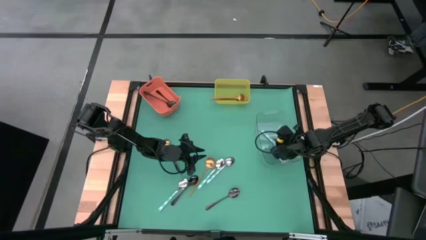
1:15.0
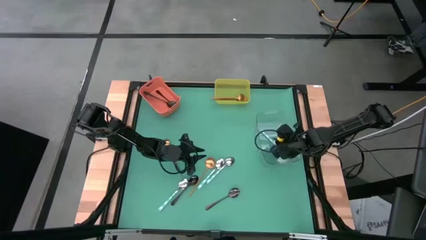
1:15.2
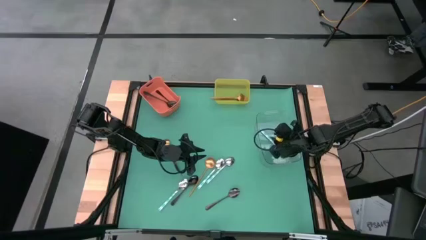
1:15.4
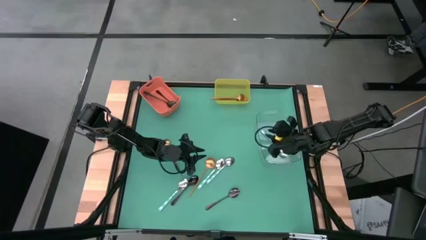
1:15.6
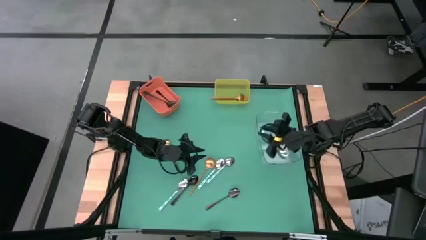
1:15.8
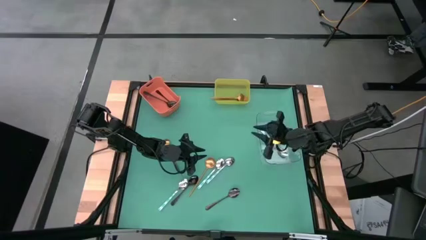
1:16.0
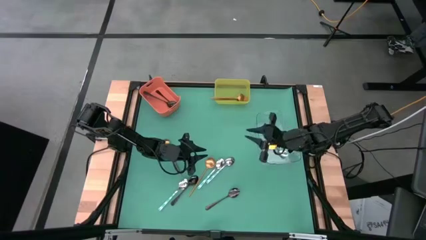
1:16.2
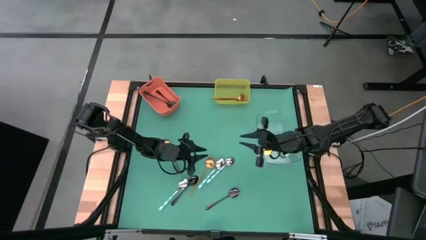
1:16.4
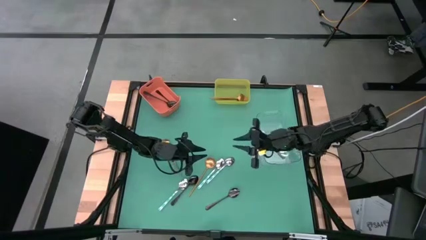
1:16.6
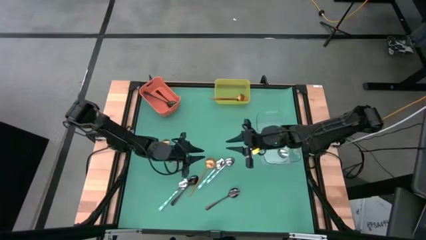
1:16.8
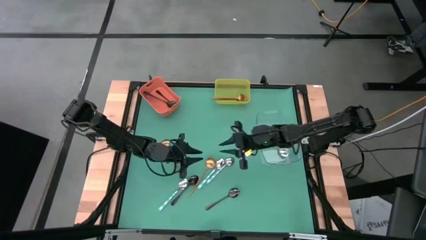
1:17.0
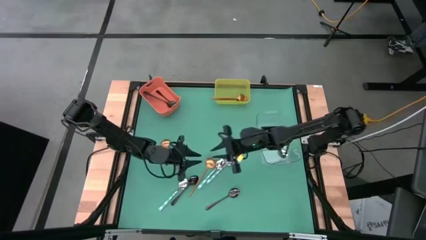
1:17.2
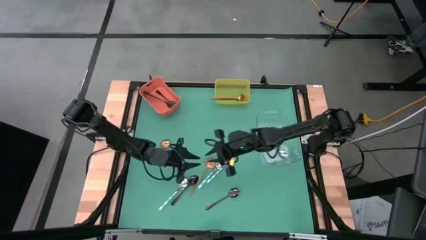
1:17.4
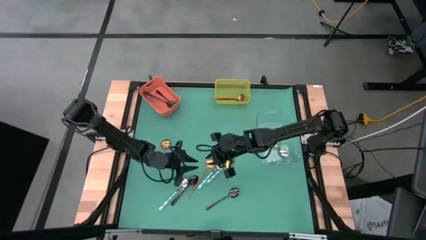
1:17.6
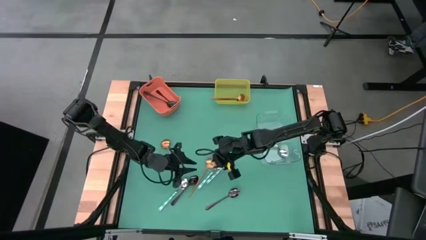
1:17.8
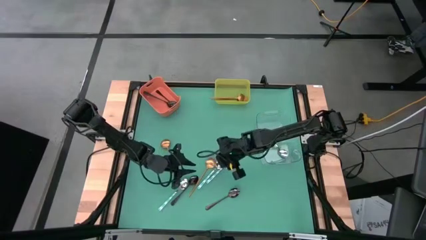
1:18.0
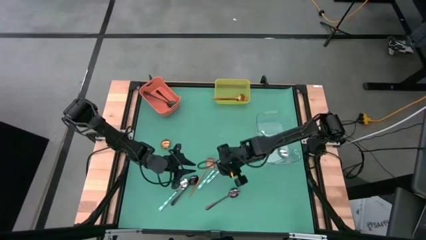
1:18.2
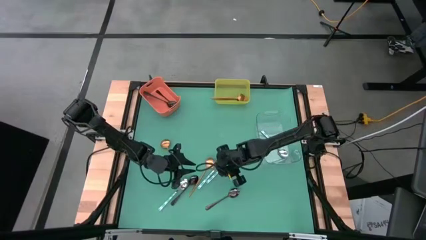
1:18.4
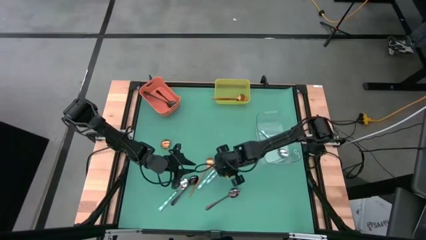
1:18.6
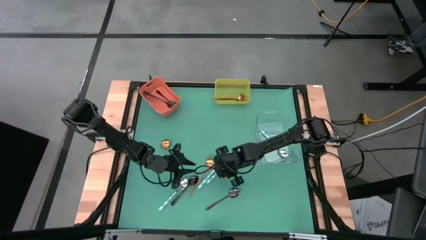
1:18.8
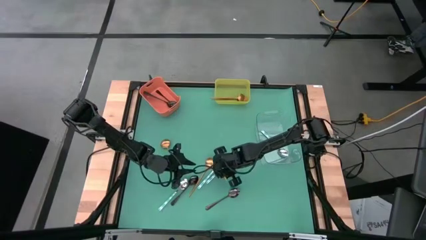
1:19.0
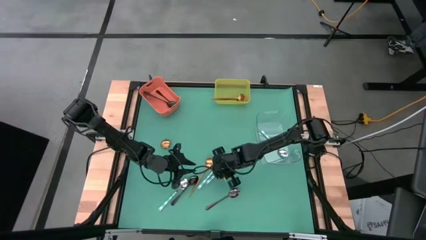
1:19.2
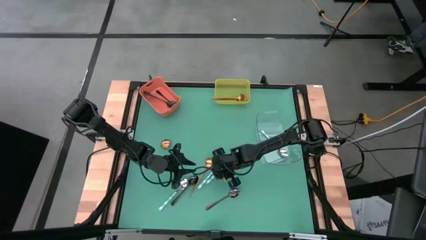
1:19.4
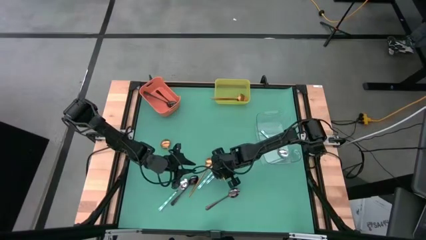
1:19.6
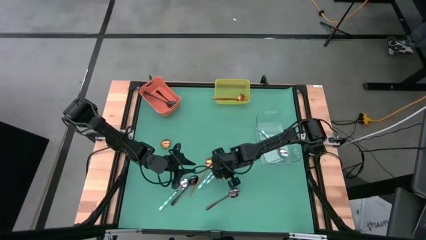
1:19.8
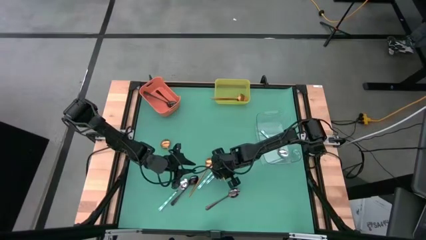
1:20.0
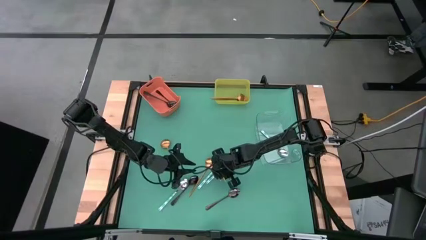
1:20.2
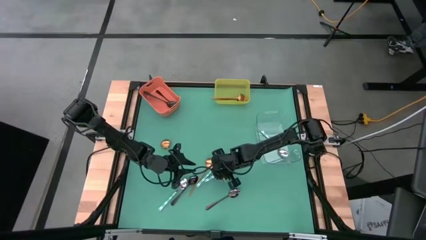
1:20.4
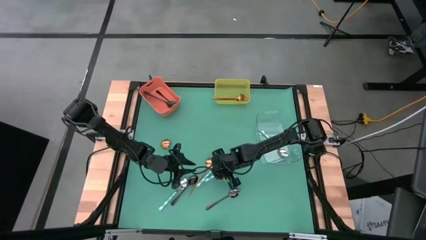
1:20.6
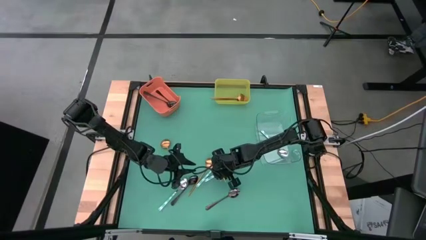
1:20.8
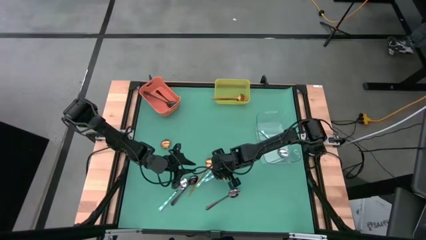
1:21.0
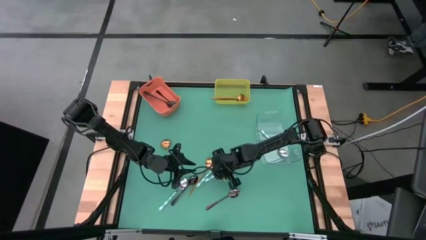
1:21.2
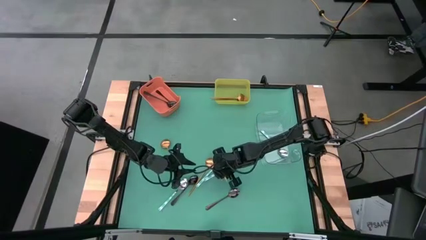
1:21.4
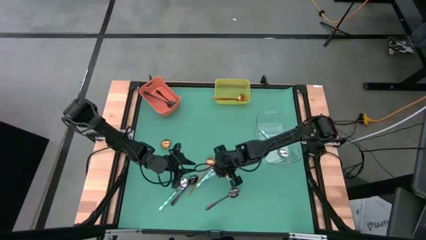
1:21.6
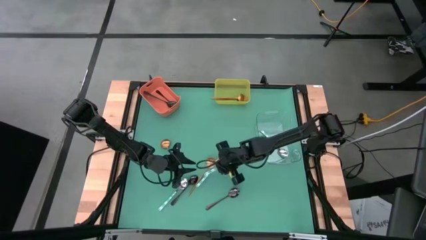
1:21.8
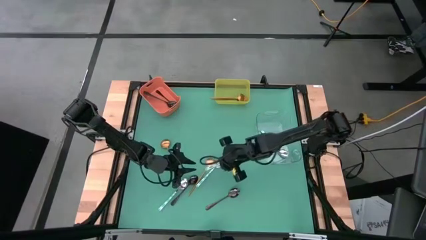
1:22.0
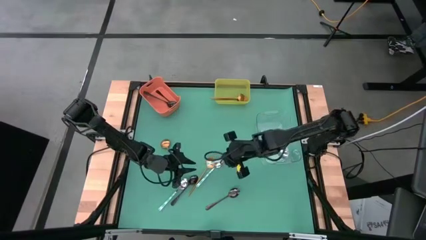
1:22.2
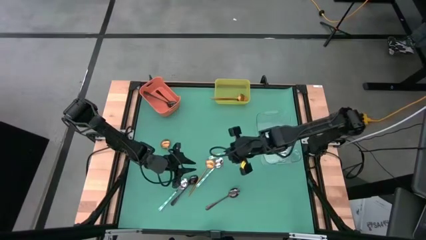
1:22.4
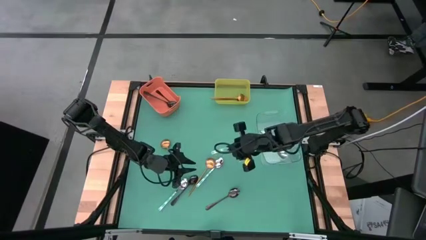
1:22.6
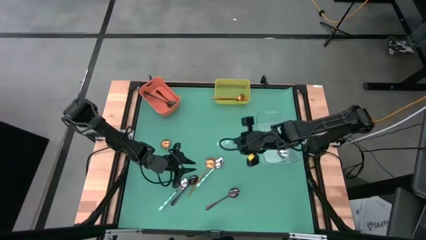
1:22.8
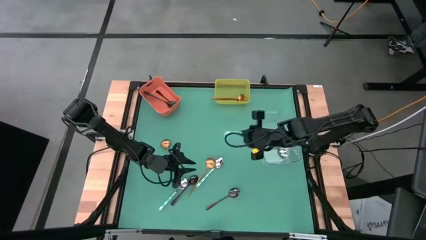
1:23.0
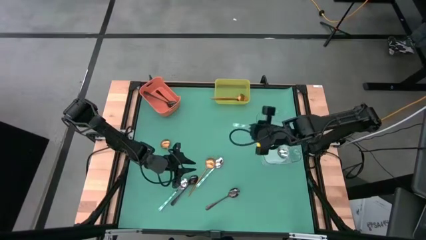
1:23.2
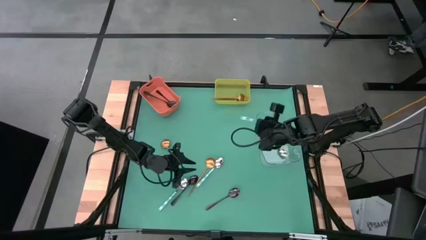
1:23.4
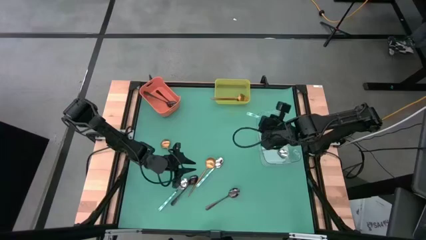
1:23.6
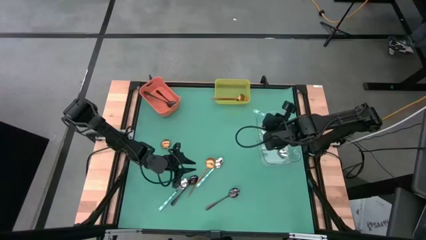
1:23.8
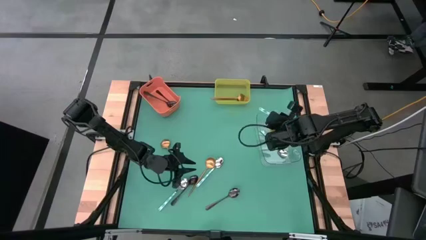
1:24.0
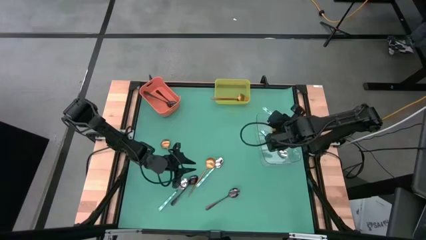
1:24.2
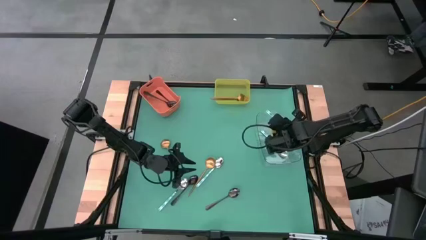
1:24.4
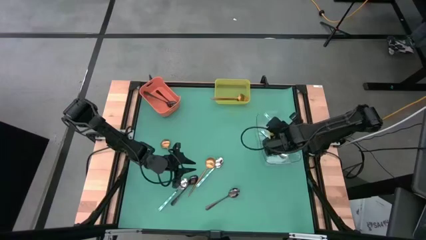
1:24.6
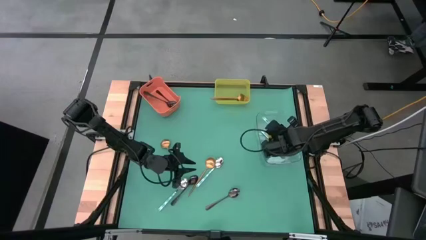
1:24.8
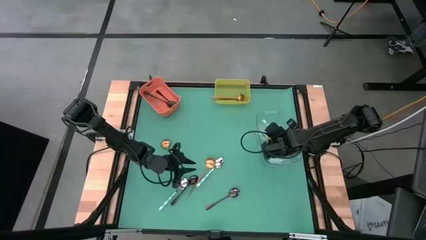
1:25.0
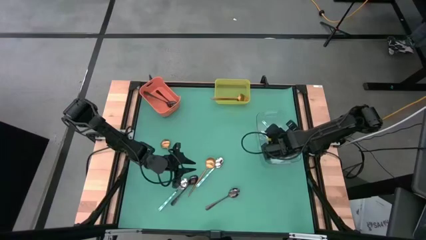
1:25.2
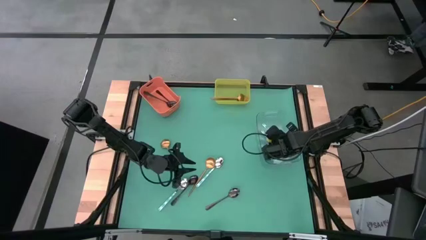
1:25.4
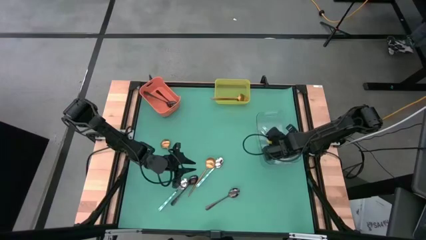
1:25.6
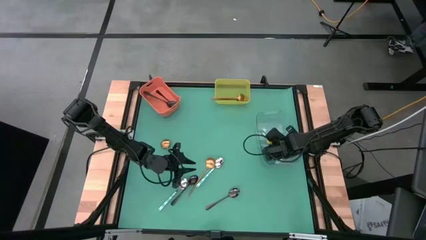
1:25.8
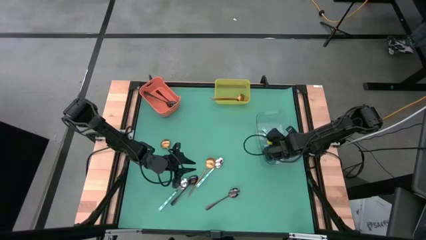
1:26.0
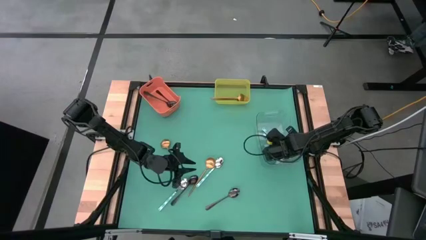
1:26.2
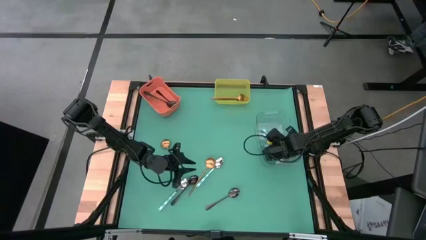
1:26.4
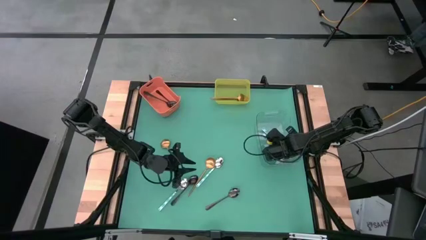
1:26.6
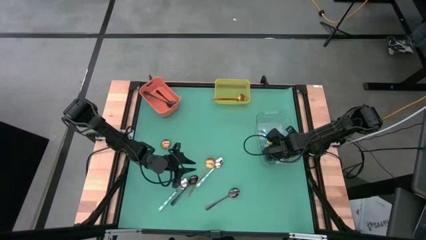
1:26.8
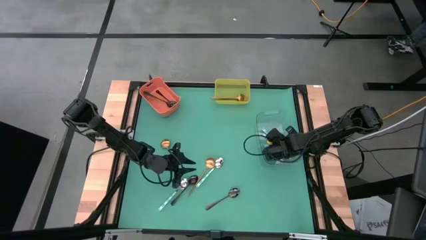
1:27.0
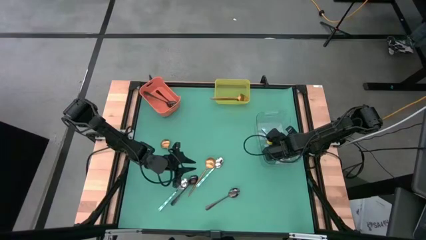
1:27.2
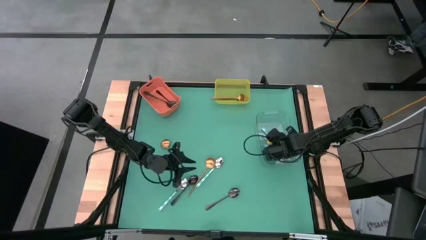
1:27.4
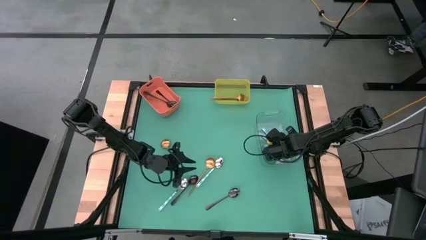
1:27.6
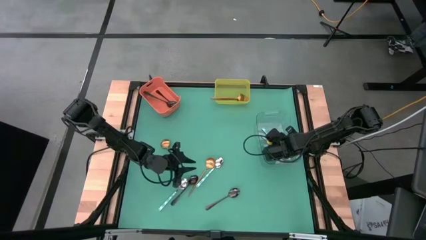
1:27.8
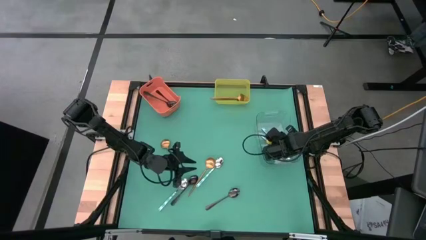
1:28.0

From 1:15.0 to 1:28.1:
Task: Sort silverware by color (type)
Put the white patterned spoon into the transparent bin

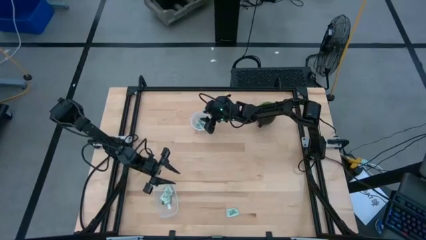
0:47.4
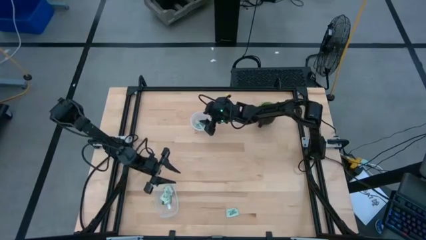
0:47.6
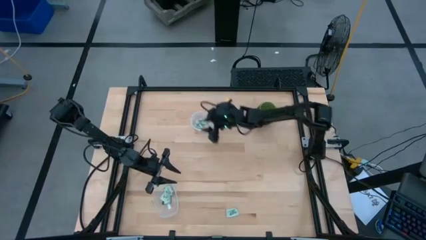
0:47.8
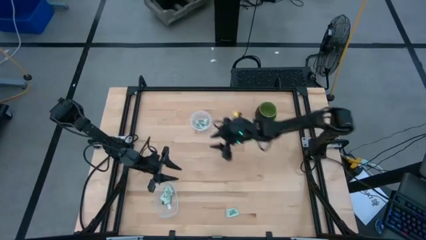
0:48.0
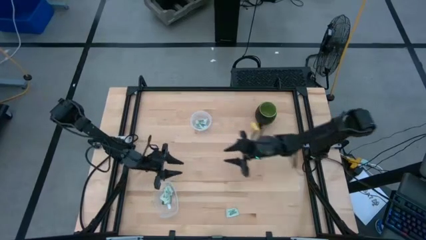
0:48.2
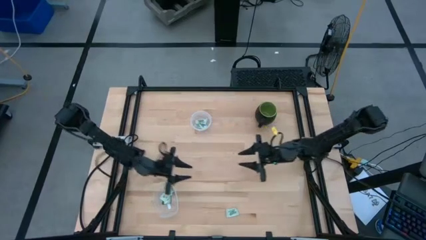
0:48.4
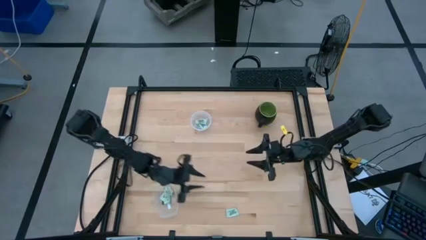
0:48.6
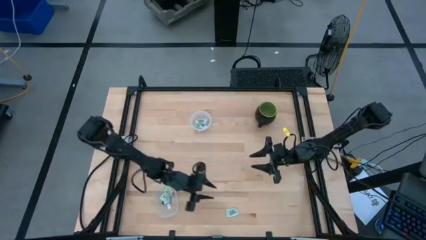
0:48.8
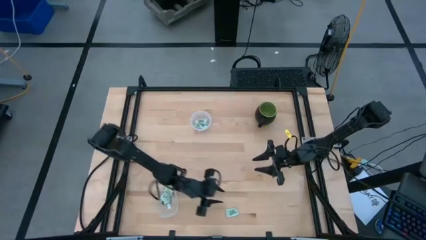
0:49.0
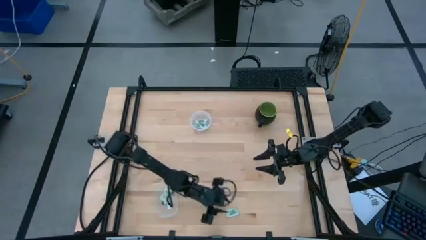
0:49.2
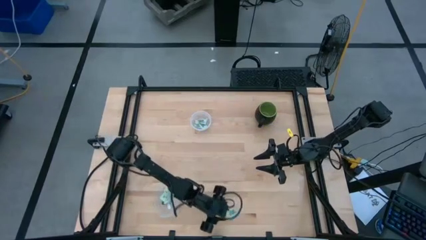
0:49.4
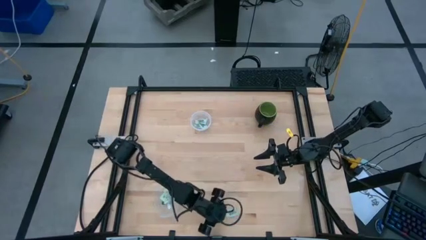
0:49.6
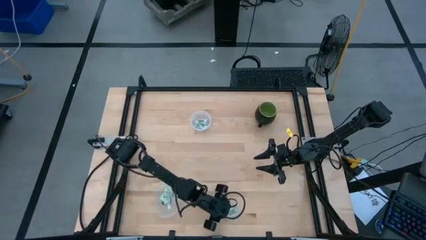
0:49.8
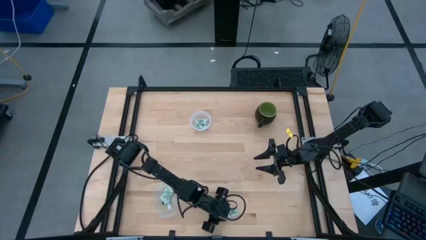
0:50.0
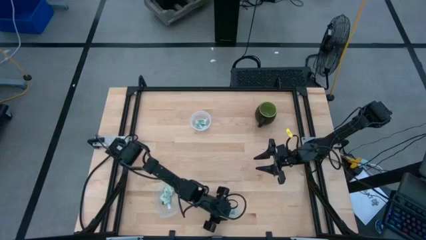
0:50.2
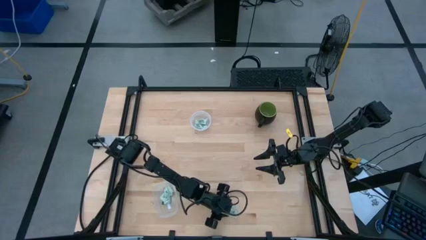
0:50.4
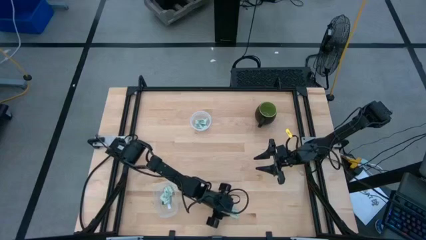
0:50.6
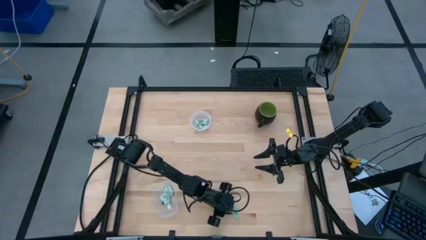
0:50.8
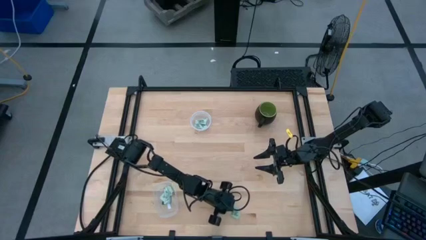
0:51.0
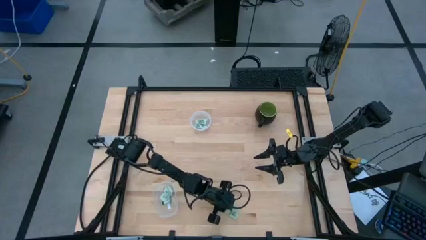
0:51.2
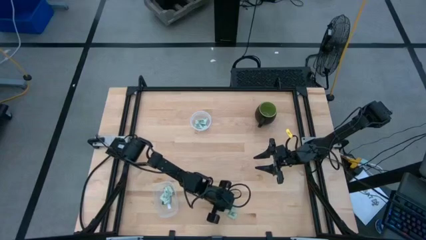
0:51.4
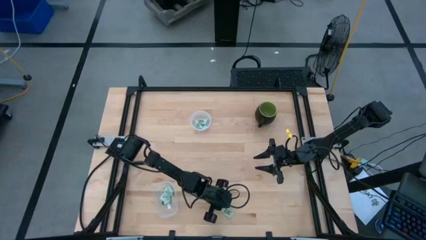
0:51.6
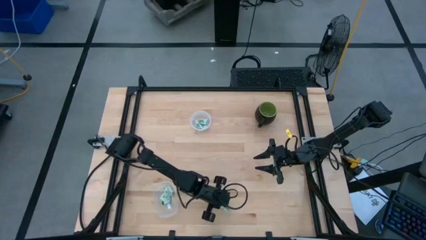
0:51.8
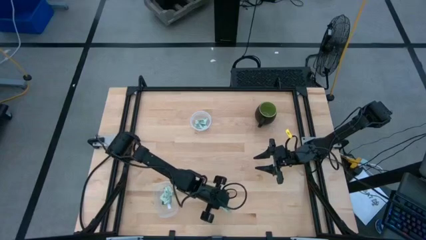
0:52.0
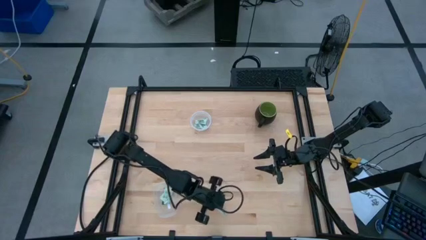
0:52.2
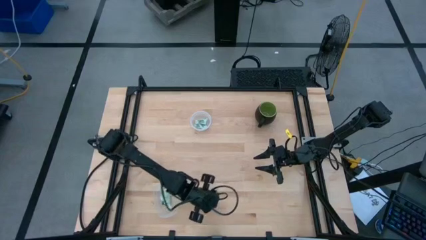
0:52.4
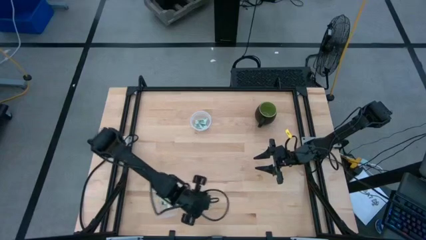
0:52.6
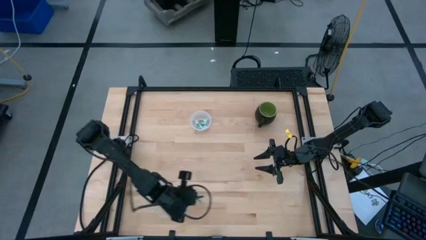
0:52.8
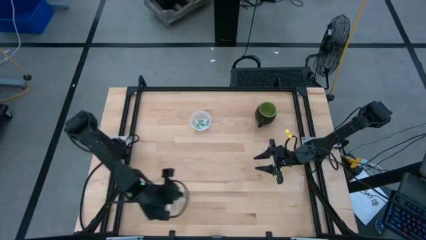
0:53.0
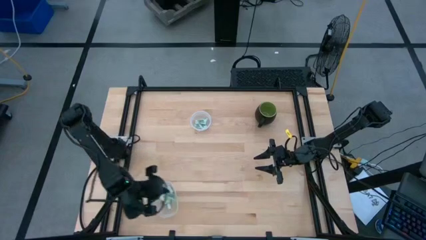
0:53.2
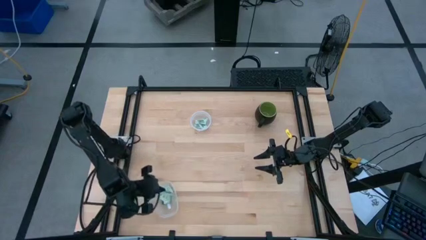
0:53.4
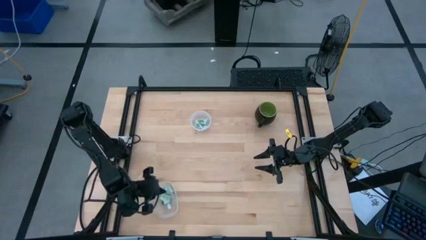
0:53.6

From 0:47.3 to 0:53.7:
Task: Pick and place Stevia / Truvia into bins
Put the stevia packet into the transparent rectangle container
